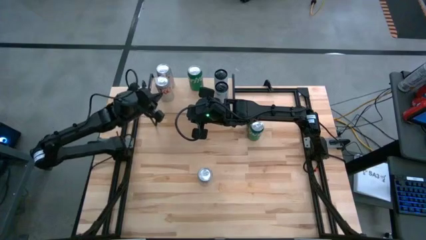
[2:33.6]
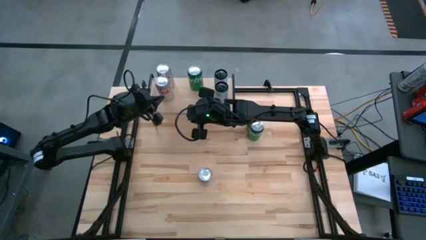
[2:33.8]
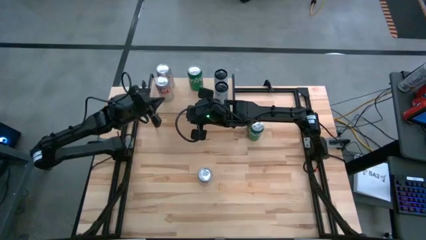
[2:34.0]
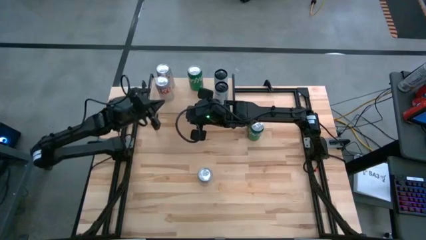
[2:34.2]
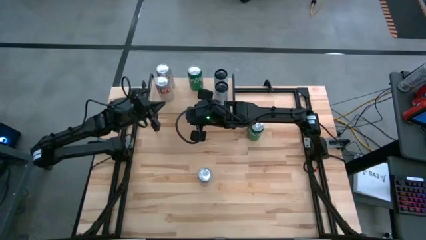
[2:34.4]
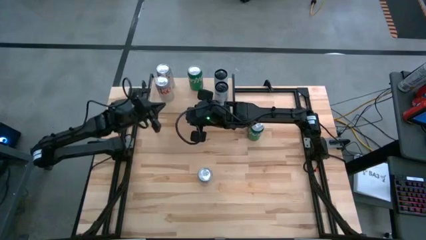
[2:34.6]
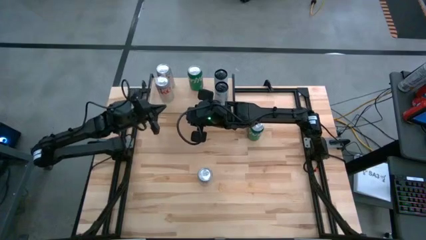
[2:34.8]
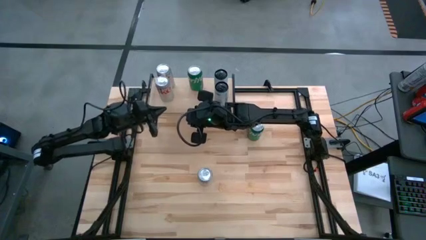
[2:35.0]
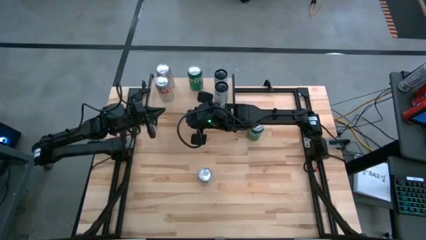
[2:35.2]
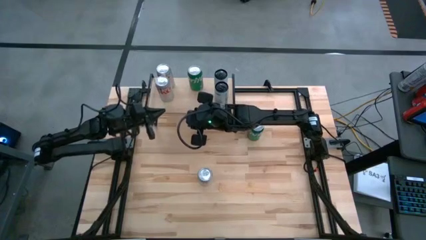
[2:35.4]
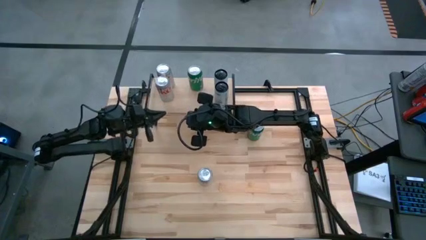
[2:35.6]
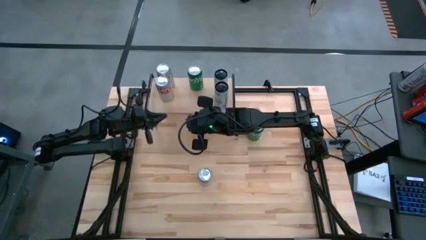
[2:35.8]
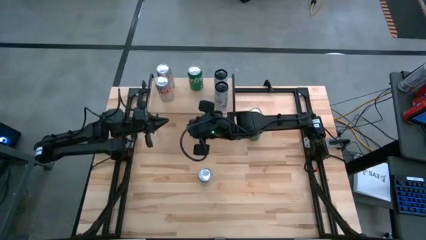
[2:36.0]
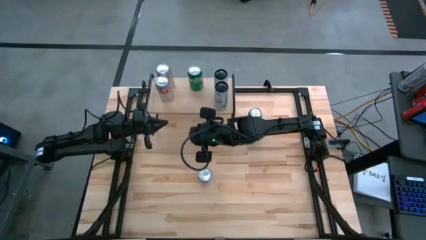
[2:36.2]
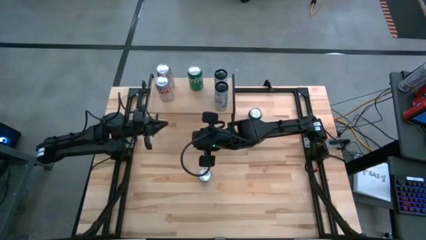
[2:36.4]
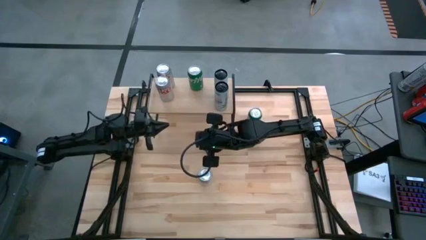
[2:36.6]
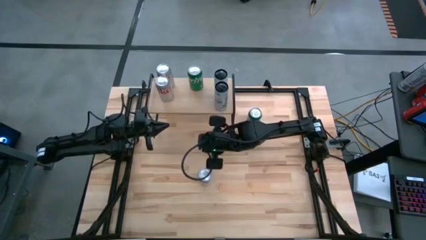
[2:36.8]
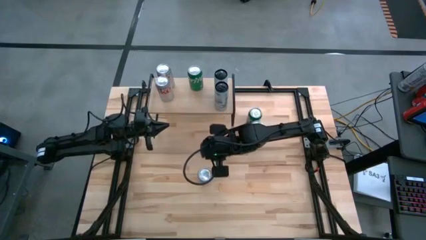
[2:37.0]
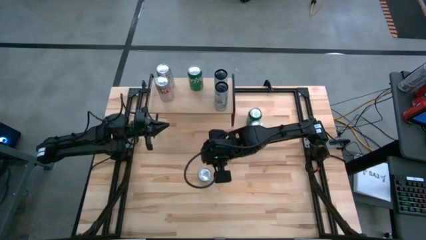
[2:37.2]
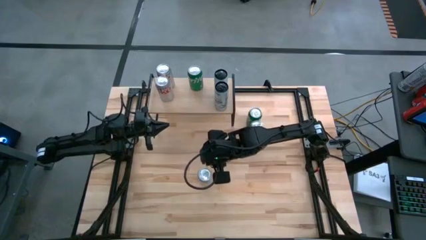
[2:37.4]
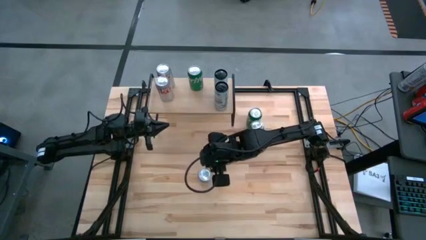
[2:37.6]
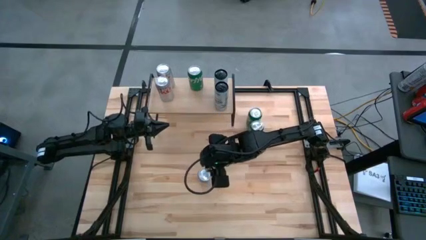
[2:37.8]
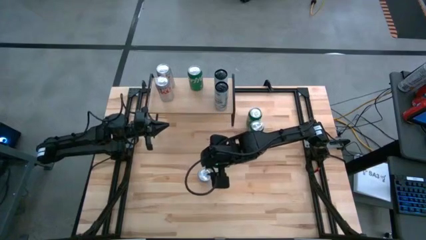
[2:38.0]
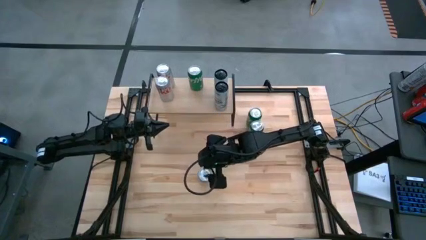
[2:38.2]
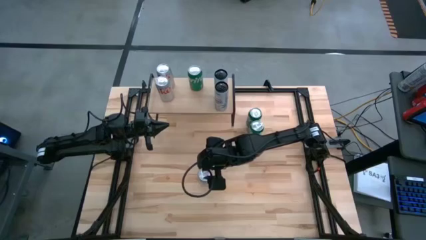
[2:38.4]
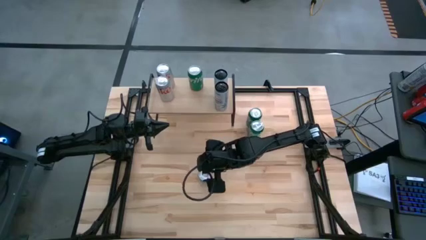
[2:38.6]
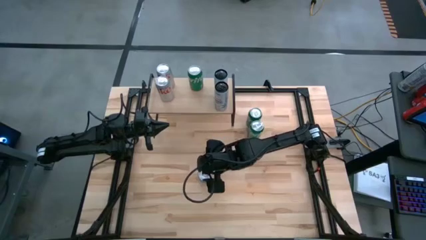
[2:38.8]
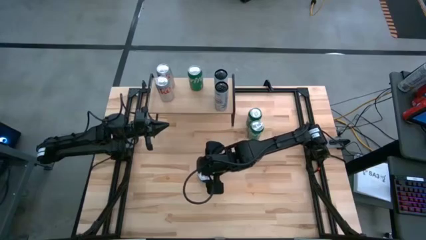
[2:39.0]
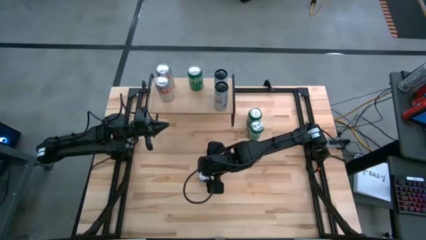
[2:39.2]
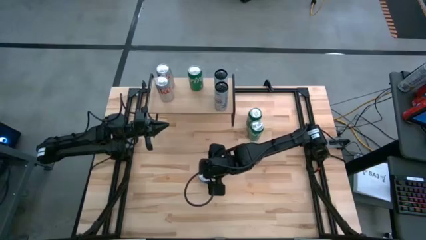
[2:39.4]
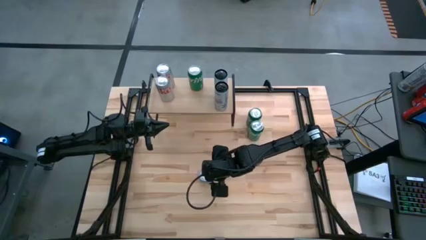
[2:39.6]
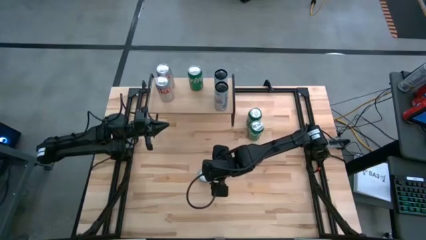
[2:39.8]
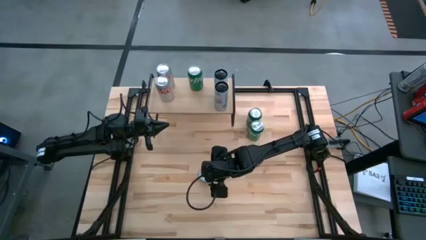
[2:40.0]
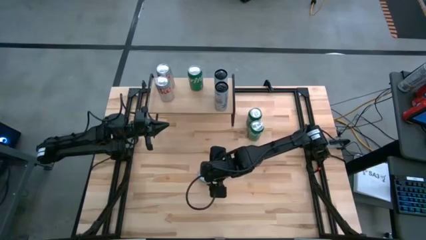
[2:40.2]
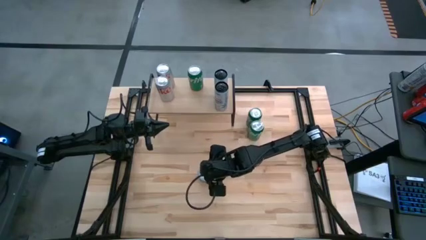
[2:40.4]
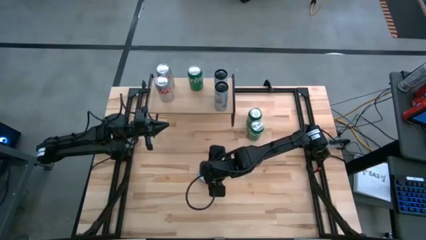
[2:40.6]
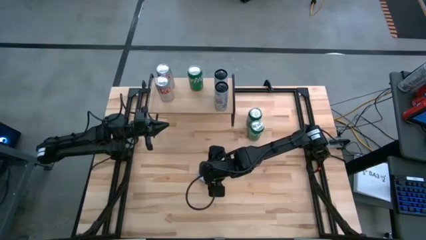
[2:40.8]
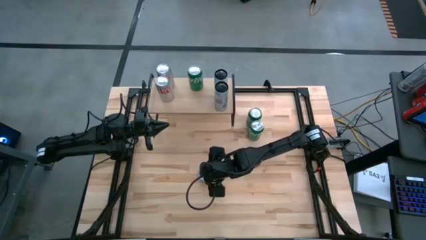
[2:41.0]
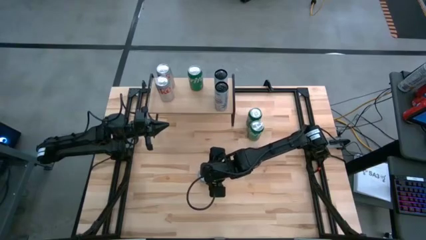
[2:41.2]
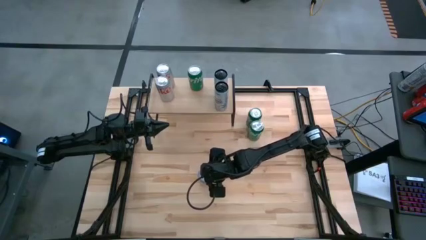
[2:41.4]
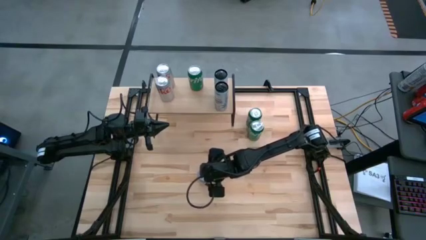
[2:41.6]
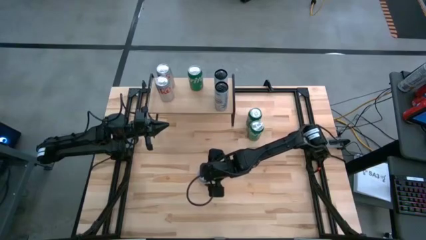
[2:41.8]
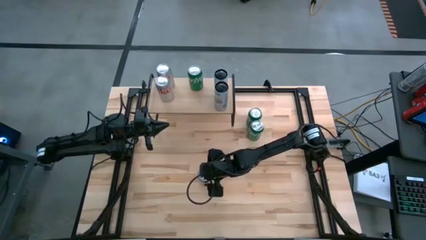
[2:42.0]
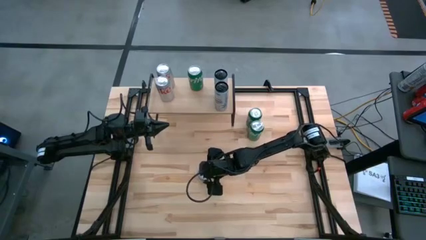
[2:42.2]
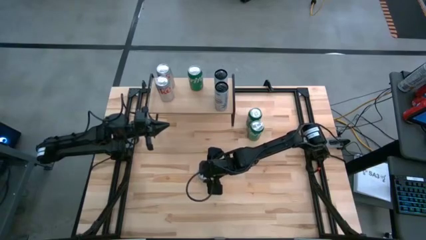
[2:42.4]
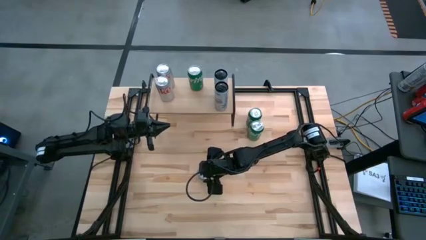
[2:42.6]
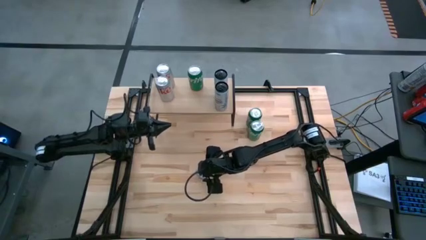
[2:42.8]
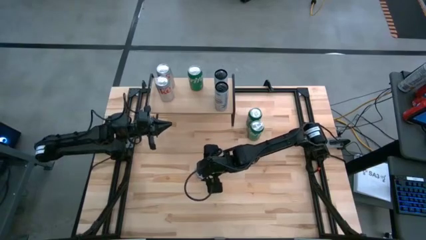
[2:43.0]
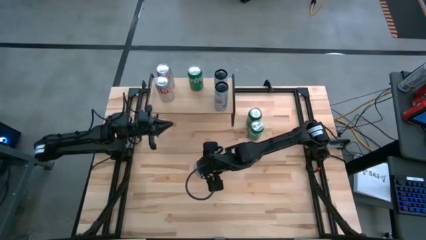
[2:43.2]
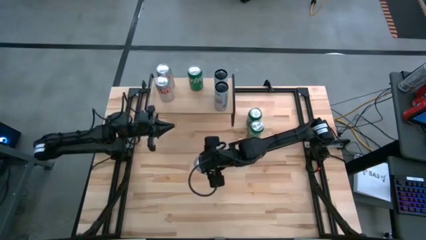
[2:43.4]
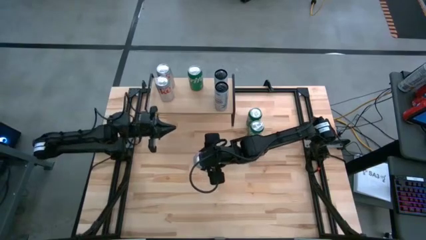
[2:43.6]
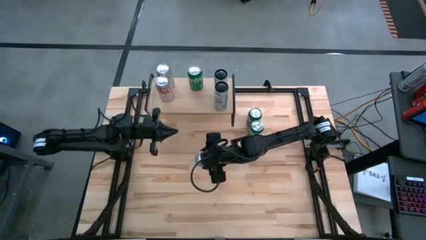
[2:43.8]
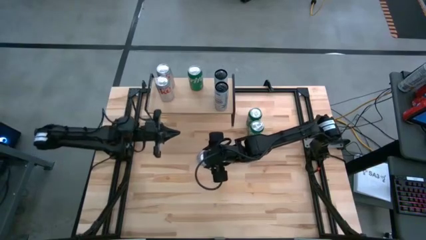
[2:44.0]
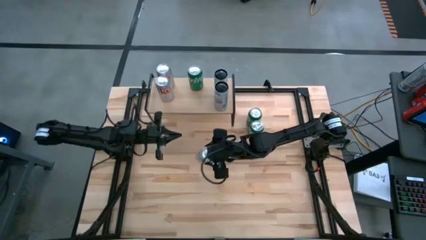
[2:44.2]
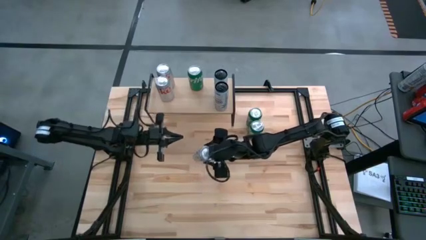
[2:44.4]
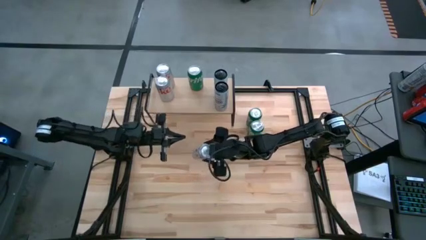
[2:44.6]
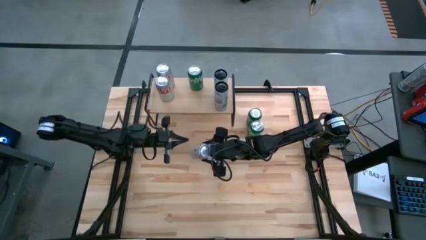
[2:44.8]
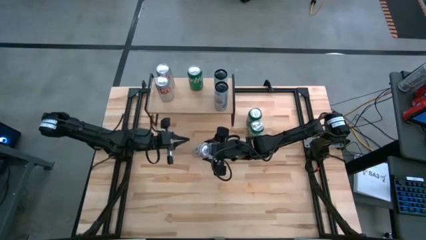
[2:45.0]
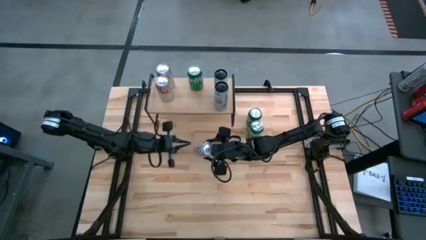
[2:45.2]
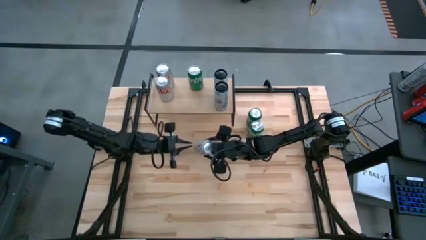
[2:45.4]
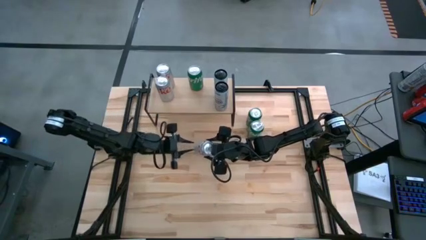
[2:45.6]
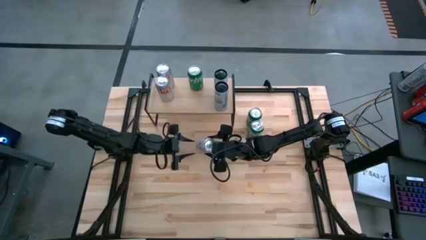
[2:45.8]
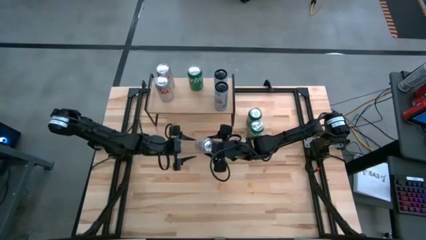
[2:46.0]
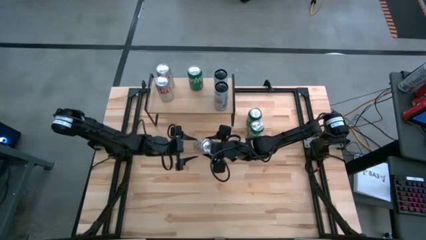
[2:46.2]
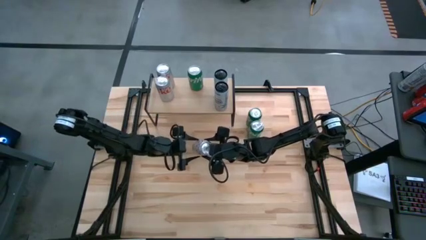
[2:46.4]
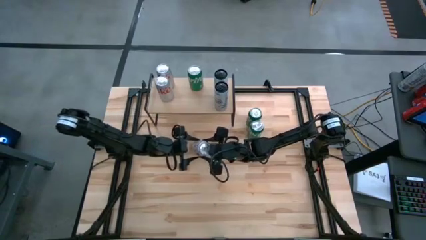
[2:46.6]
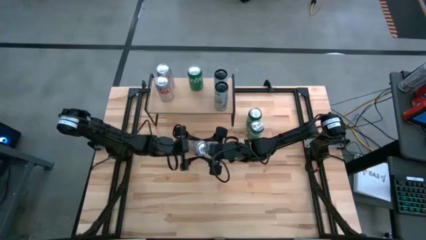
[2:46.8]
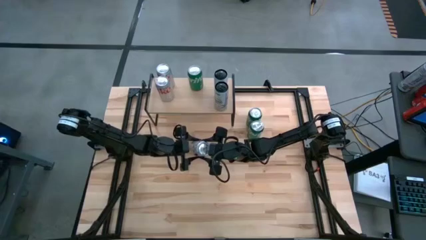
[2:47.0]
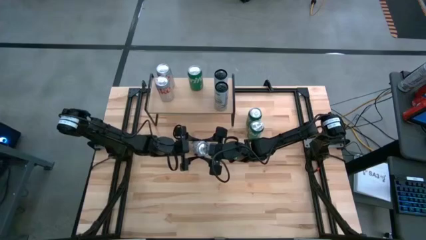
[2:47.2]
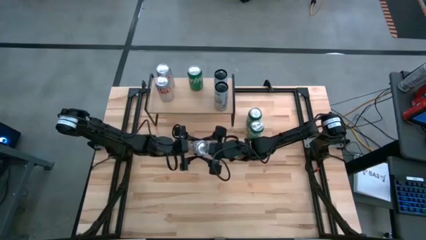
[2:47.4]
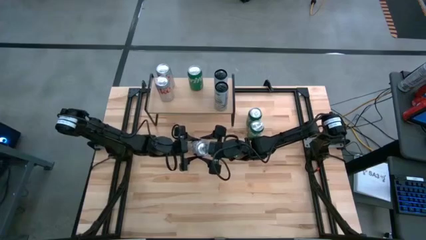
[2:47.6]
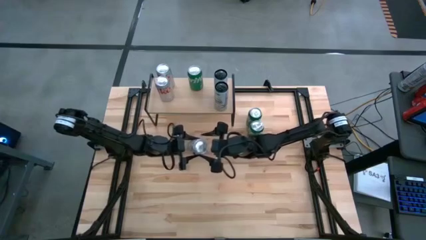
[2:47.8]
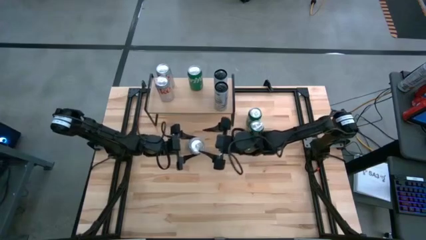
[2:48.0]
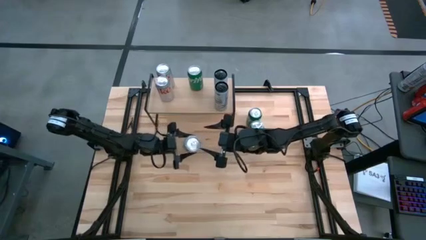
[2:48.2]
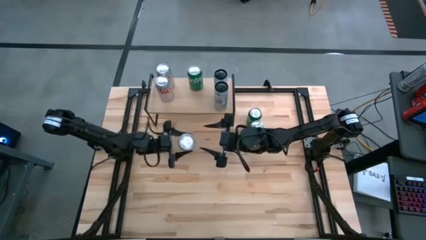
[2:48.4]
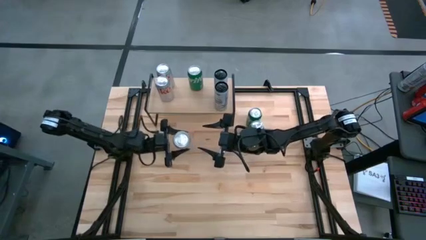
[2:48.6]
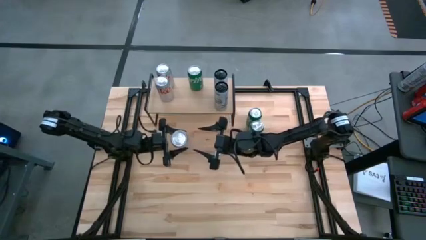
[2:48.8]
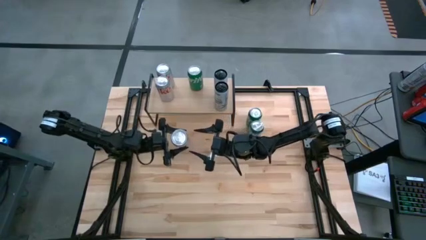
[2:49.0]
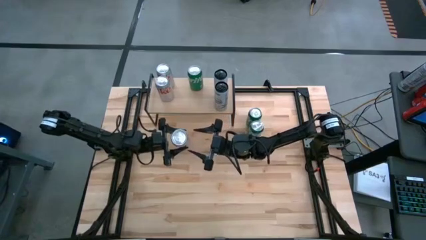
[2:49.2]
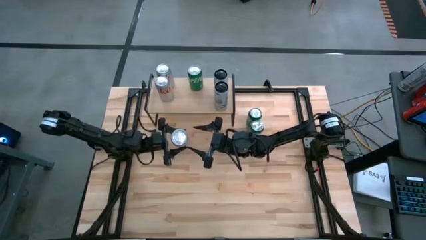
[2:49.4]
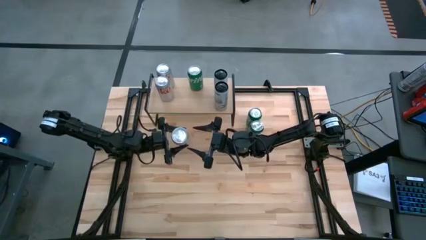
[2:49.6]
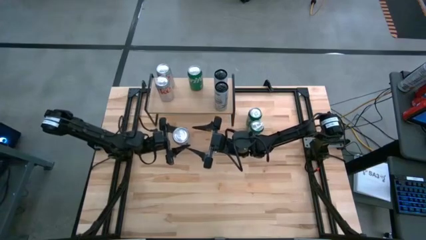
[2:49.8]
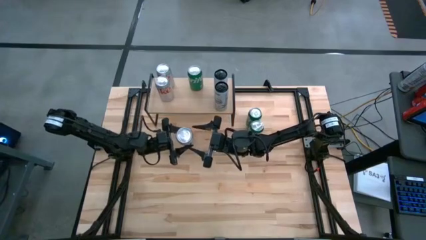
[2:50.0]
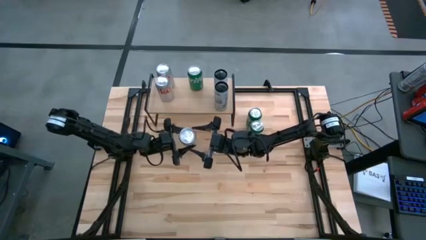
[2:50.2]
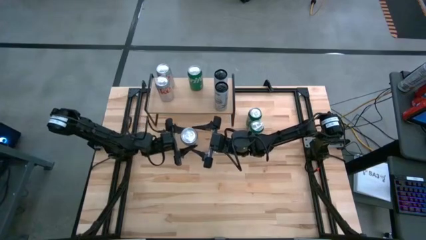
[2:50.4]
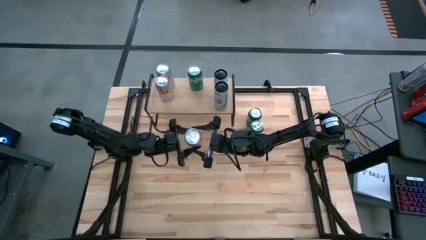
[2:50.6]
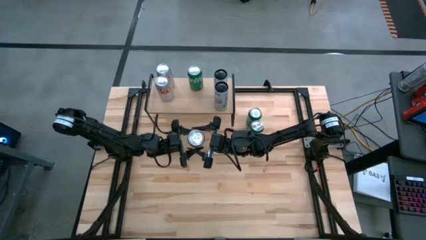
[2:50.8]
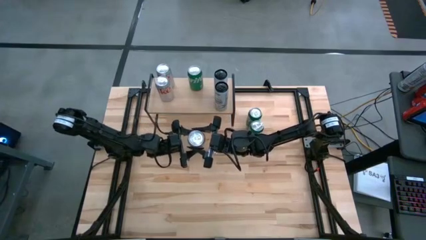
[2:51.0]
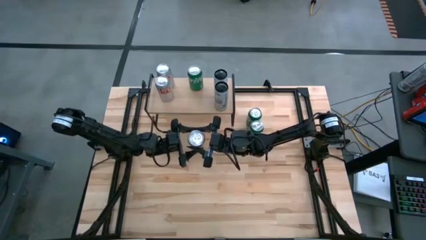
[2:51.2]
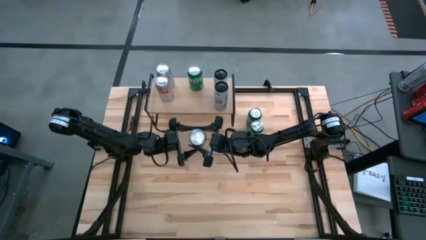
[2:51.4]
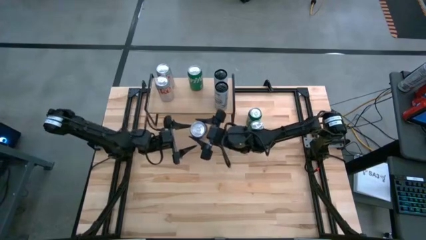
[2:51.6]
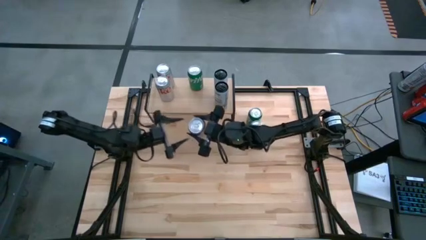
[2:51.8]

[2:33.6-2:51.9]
Task: Place canned beverage on shelf
Put the red-silver soda can aligned with the other red-silver soda cans on the shelf
